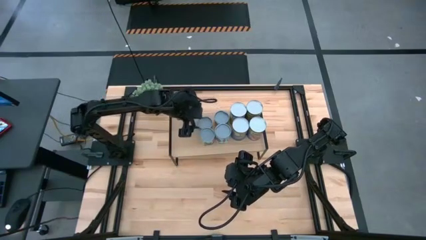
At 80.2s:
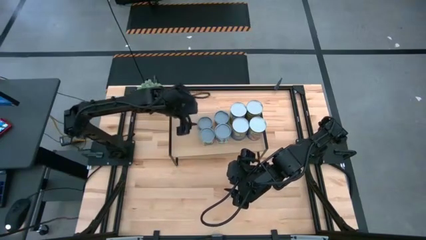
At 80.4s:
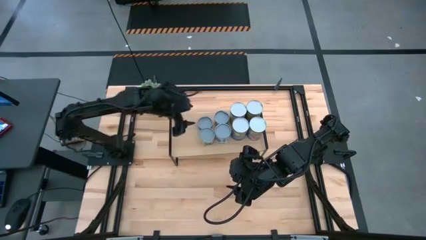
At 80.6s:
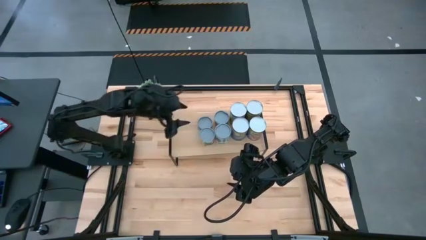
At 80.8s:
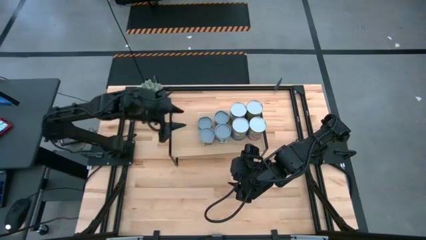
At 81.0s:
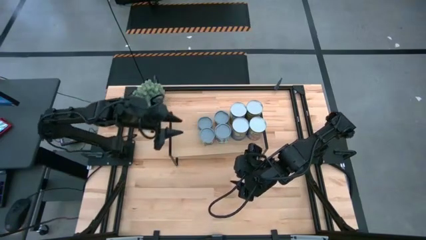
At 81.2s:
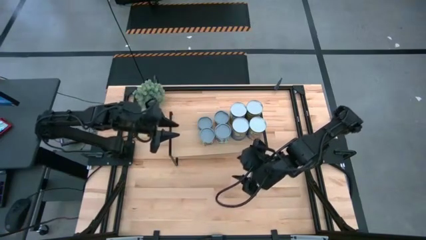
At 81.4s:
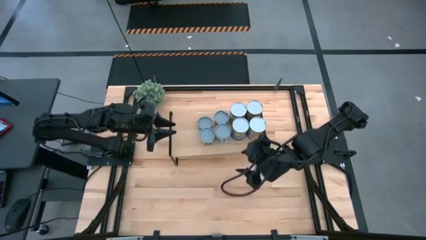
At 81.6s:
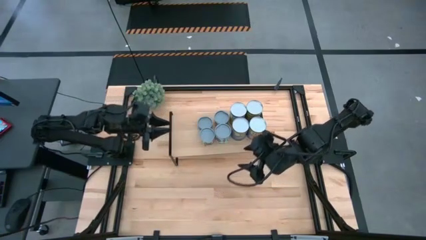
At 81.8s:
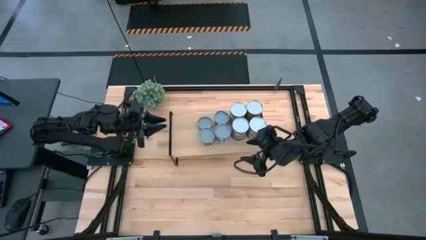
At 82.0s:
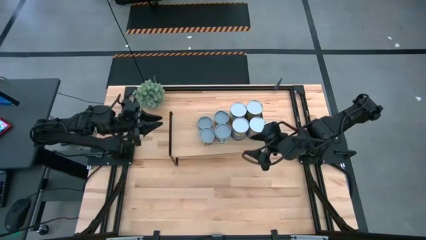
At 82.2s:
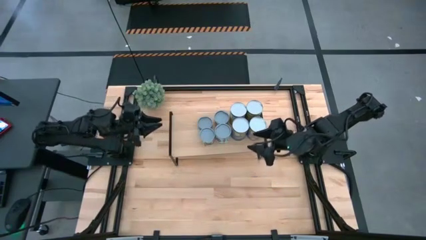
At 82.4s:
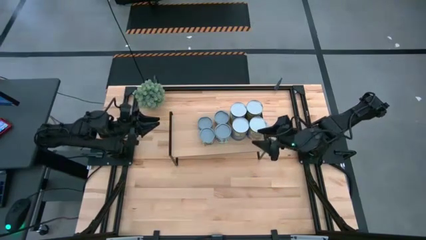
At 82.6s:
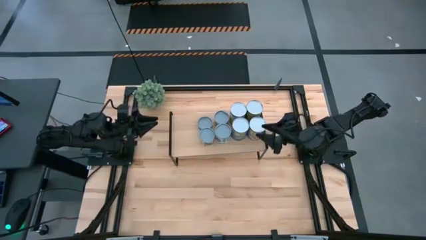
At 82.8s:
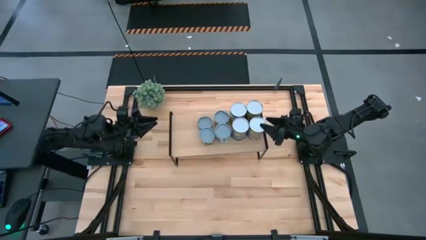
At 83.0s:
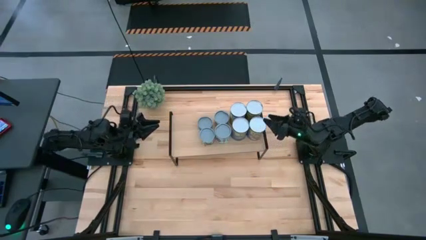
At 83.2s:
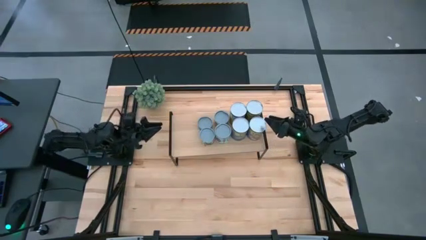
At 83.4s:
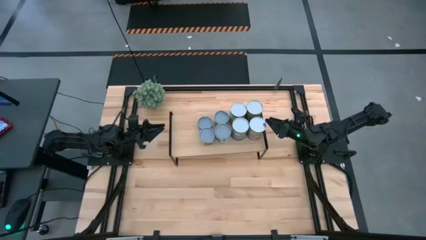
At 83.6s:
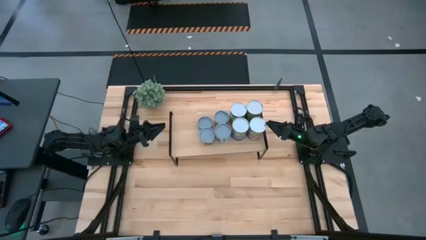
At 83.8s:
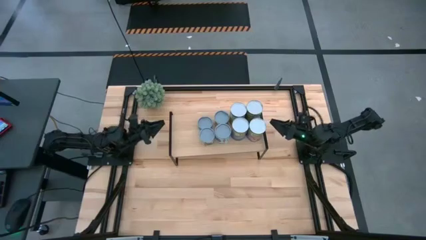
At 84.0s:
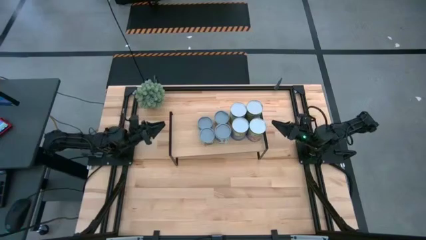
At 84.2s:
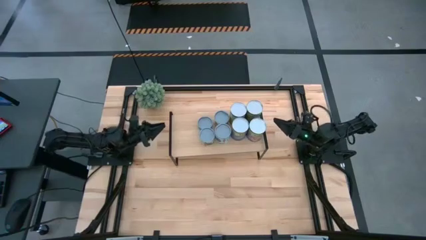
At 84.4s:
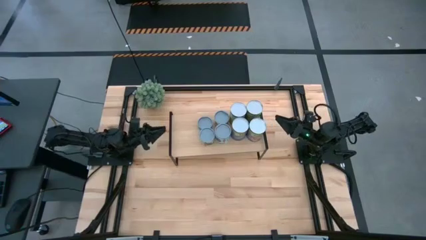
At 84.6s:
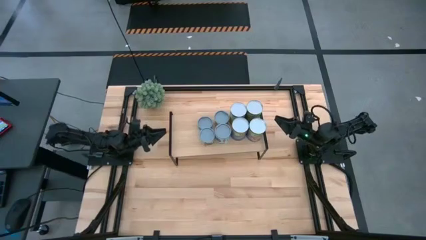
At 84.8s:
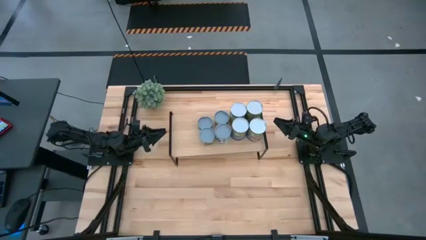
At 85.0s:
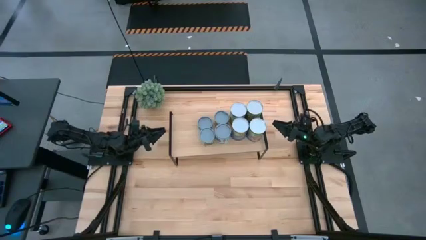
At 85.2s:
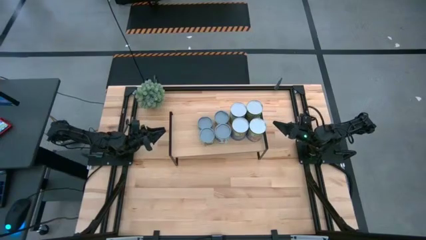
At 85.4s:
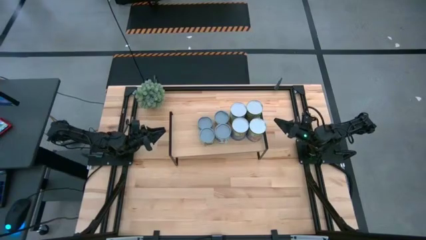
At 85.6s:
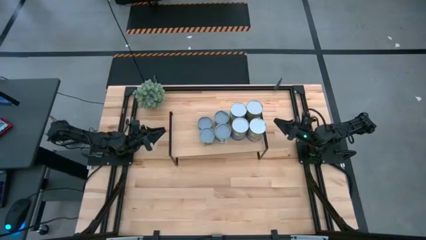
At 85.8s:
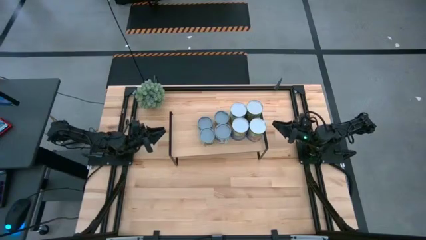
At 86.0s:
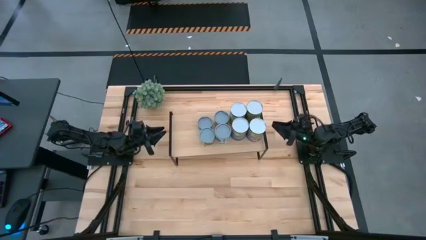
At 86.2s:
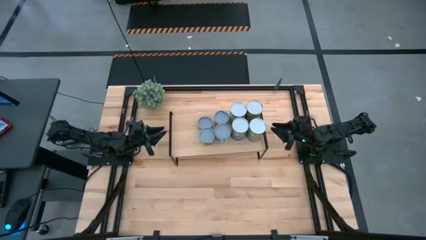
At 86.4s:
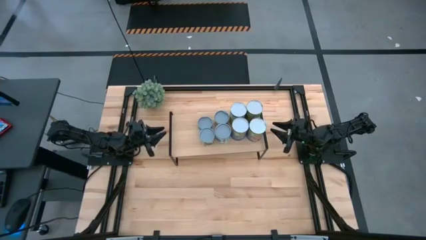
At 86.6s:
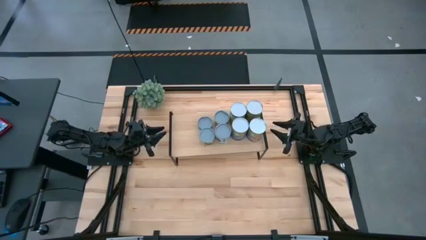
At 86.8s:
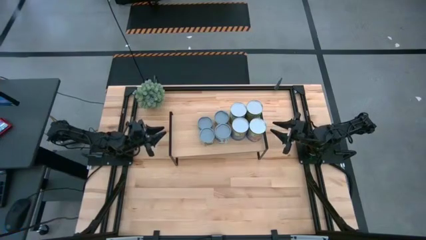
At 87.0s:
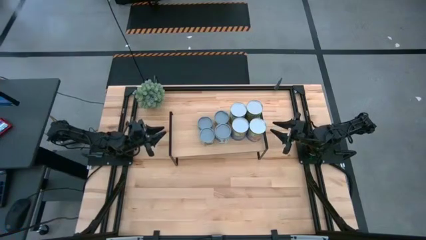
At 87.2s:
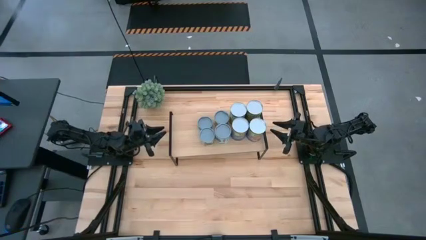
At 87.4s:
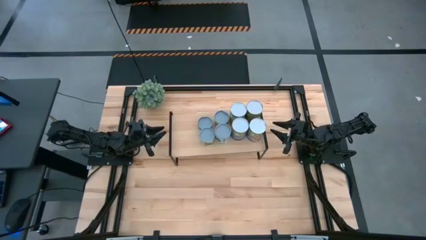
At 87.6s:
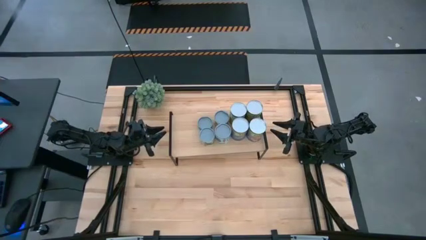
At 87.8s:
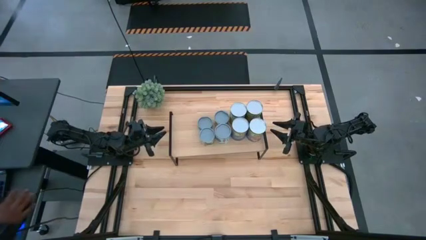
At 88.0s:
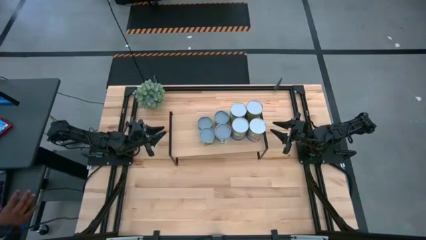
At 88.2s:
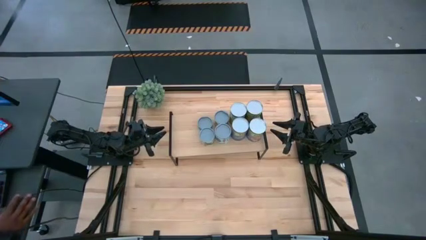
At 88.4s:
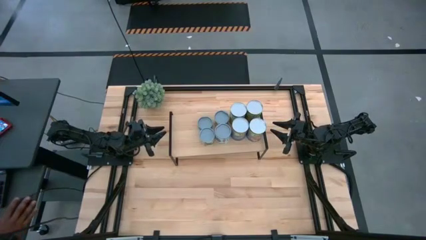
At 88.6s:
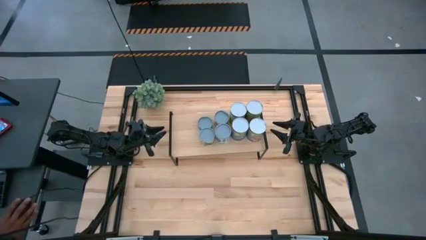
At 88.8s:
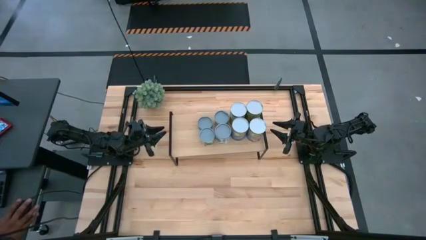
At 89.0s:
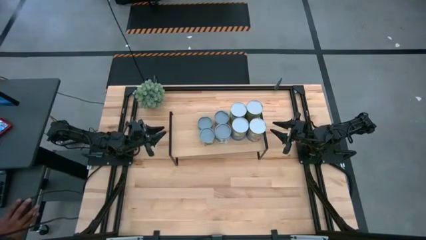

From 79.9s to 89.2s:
Task: Pick and place cans onto a shelf
Return to Home Position

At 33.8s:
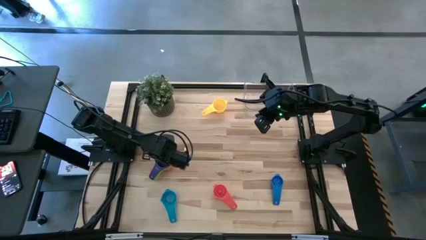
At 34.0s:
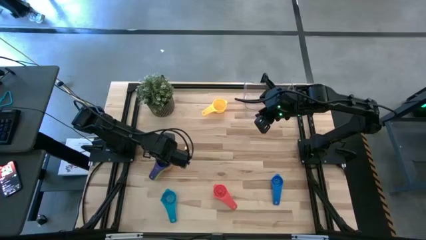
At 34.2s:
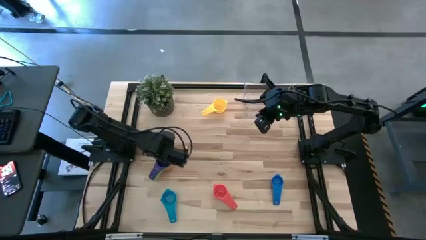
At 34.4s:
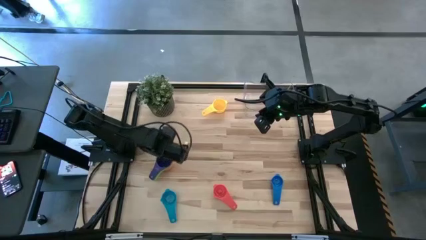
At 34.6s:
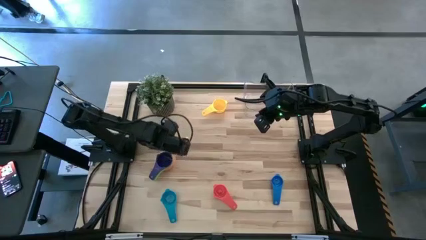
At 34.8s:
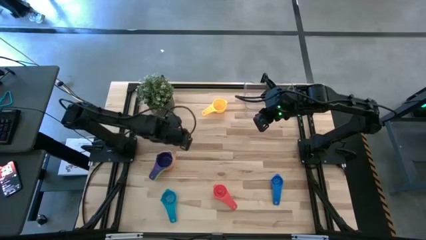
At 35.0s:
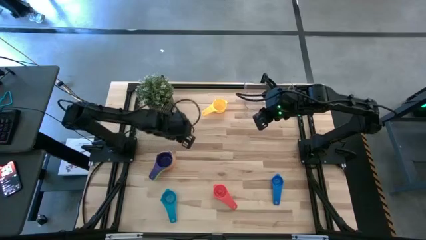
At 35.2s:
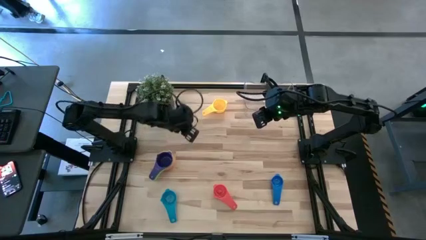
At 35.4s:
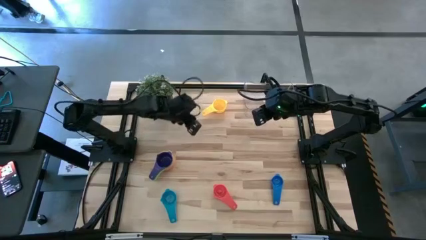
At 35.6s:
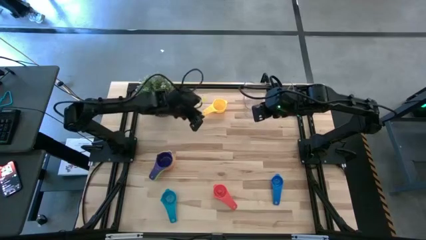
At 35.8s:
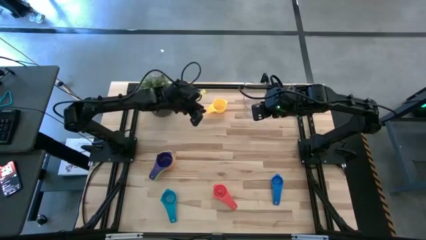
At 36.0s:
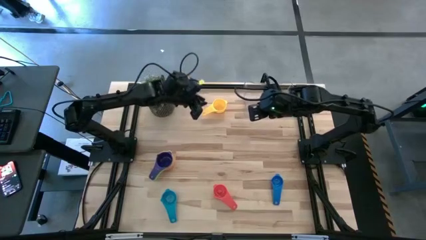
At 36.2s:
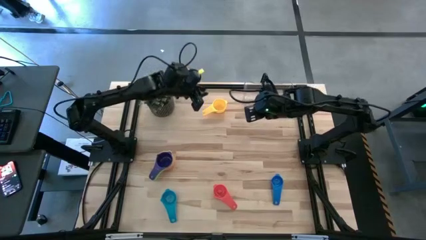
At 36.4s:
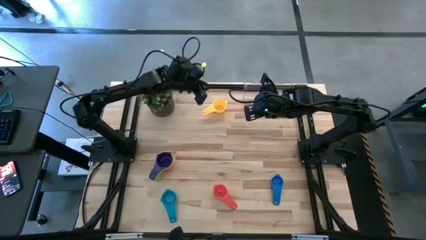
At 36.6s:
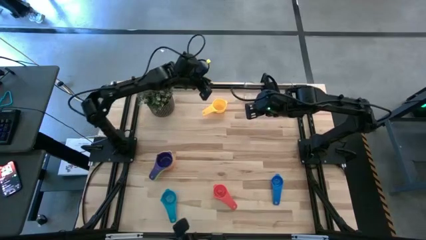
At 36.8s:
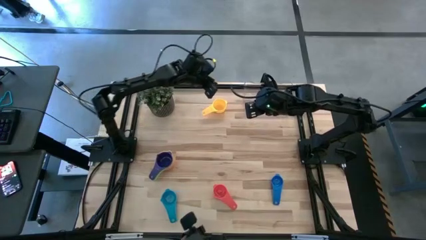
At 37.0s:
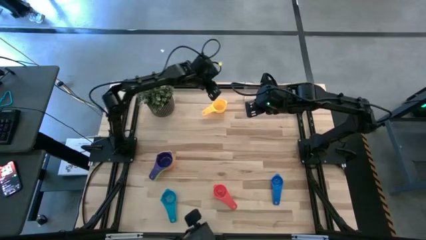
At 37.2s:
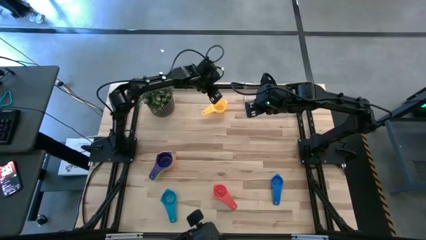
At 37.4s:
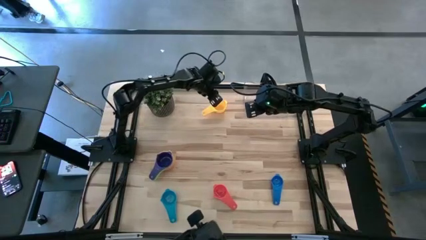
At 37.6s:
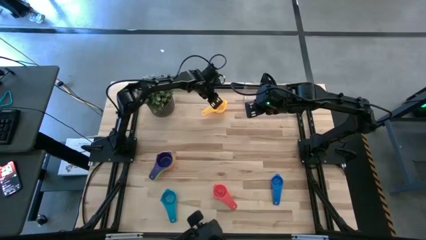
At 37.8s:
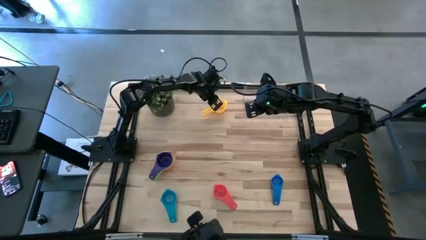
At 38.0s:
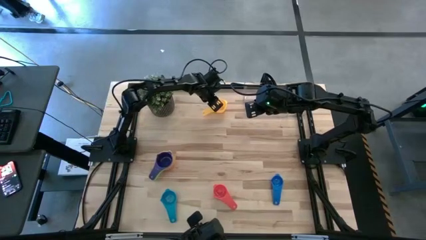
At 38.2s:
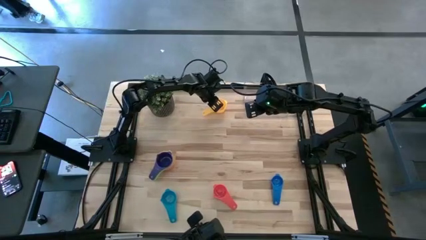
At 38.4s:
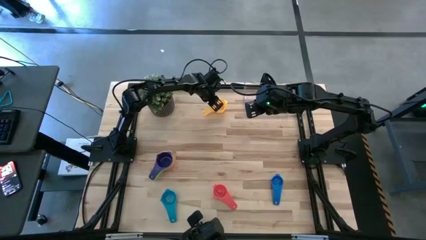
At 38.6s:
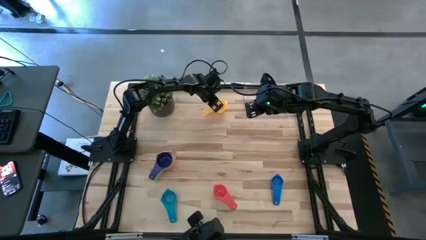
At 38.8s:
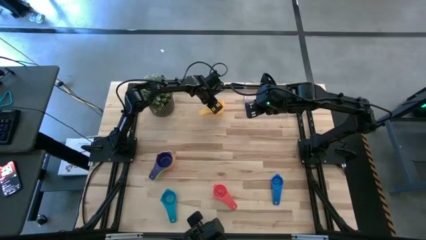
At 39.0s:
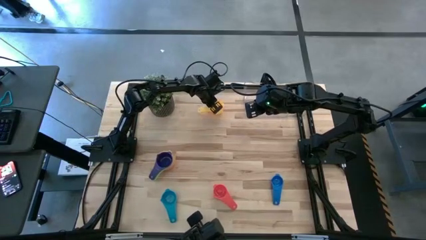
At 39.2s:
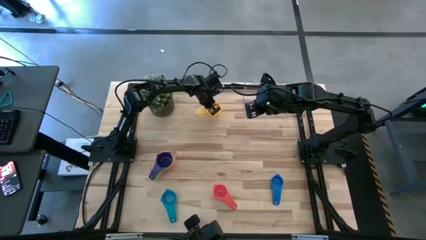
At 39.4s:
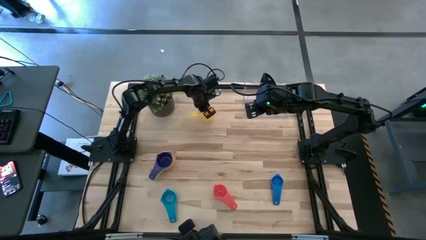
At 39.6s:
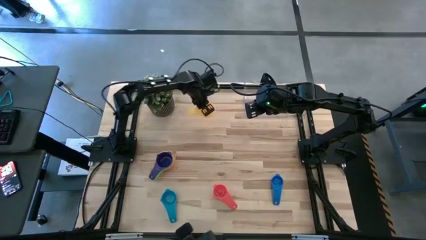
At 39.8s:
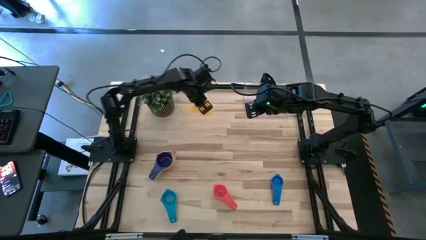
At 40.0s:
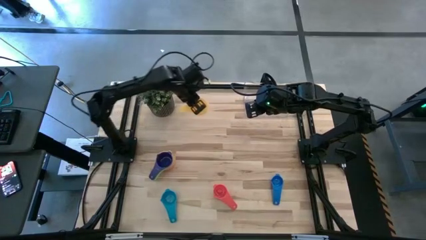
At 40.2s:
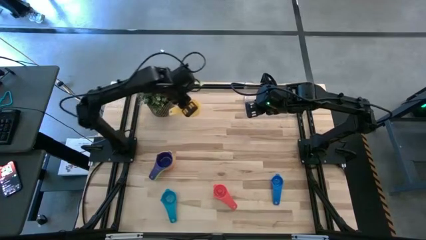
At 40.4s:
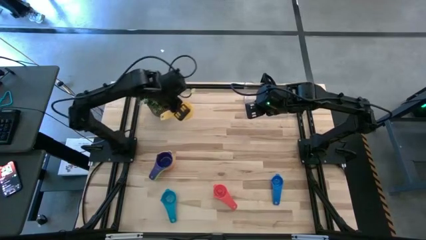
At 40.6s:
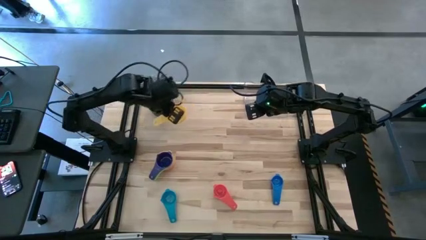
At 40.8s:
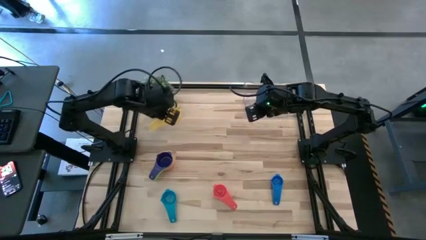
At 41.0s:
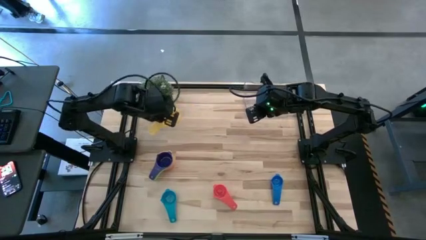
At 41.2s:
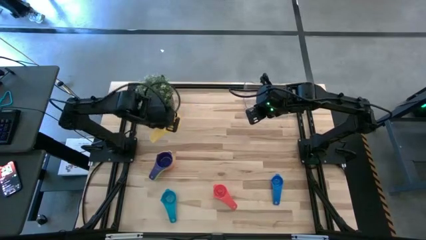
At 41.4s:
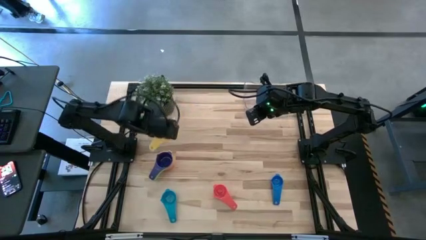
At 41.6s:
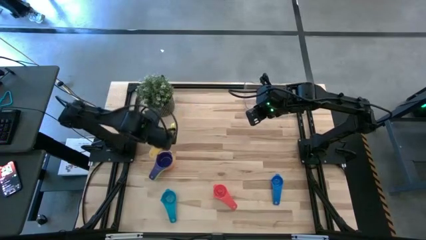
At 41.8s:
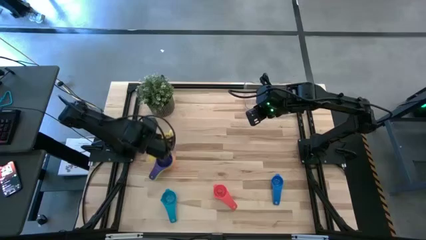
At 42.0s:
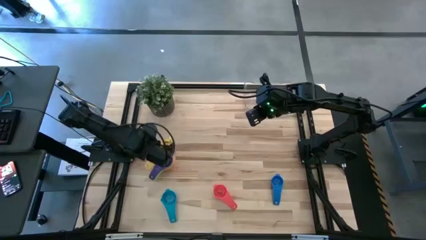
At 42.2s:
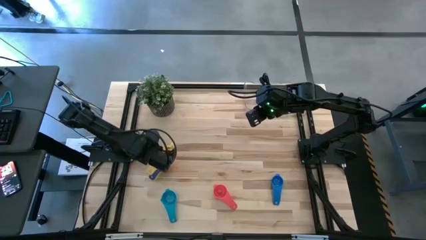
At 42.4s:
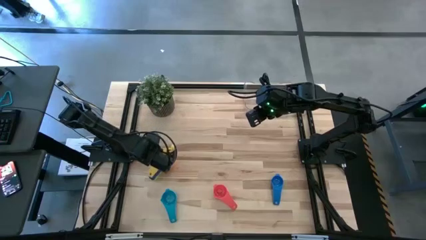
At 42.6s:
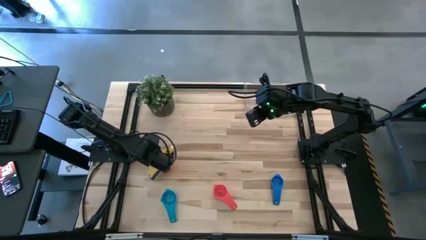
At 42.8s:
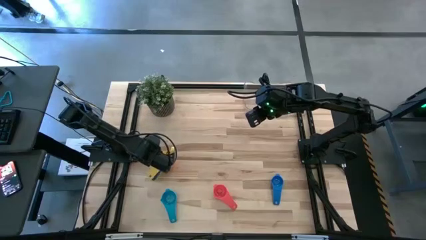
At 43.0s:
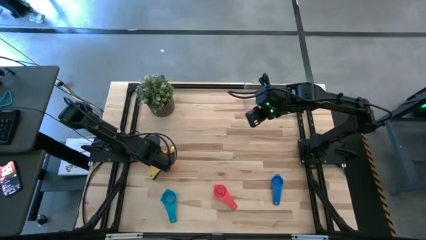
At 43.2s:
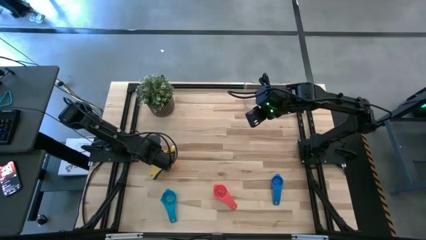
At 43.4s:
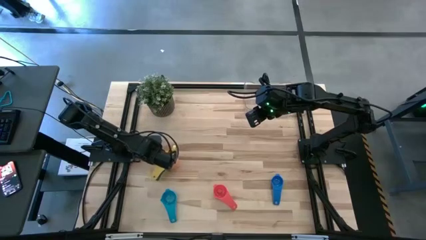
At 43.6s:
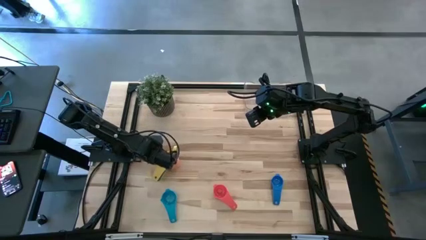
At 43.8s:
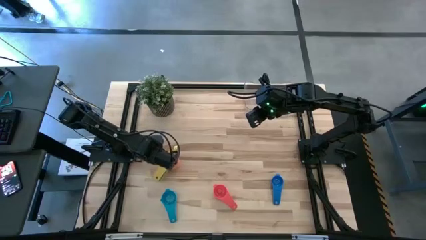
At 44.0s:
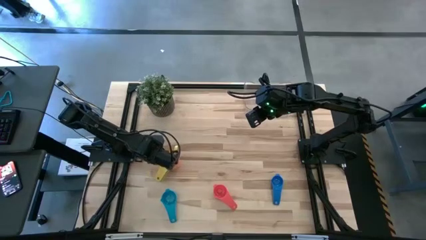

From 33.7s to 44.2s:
Task: Nest measuring cups in basket
Stack the yellow measuring cup on top of the violet measuring cup
